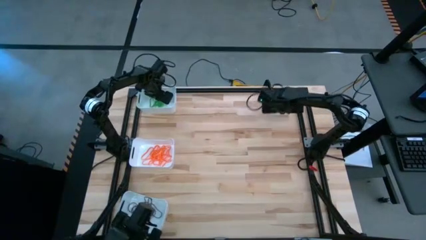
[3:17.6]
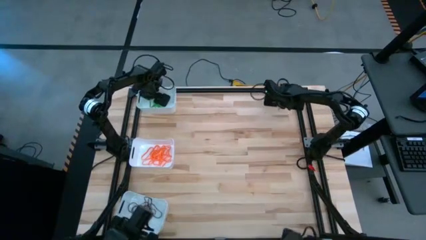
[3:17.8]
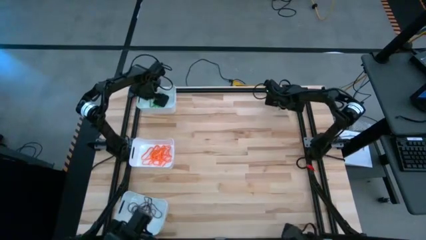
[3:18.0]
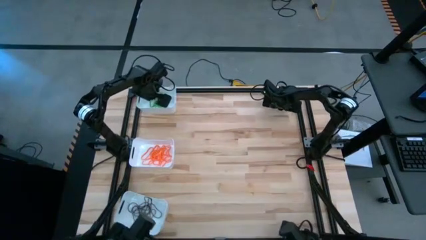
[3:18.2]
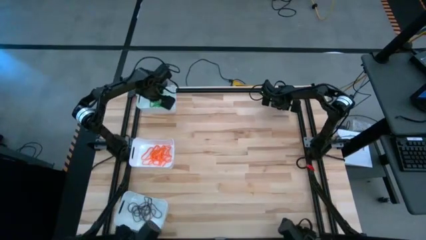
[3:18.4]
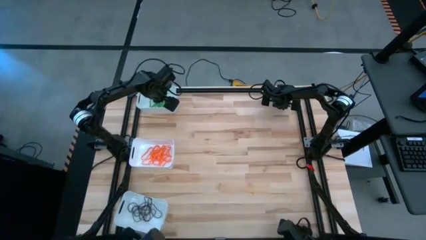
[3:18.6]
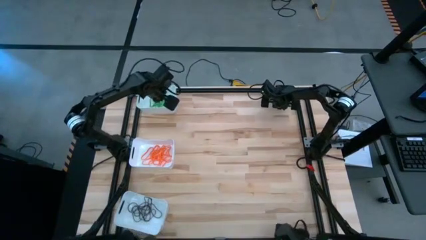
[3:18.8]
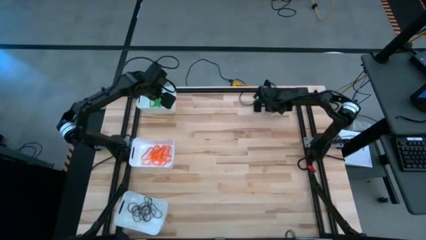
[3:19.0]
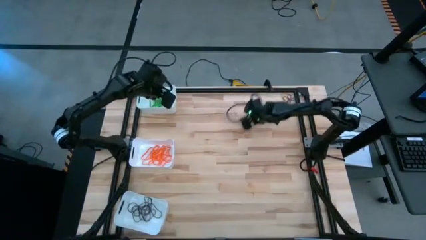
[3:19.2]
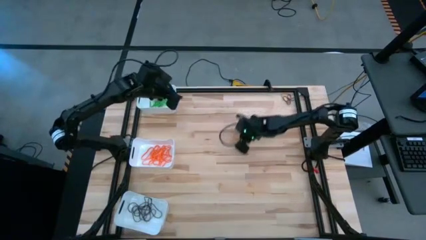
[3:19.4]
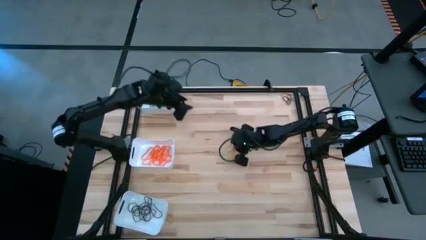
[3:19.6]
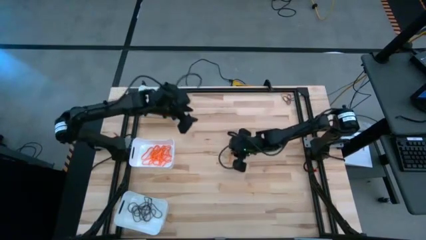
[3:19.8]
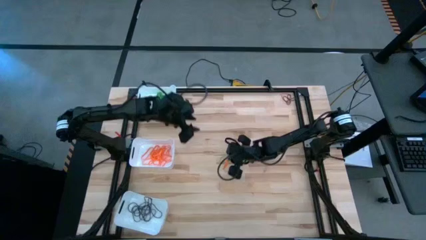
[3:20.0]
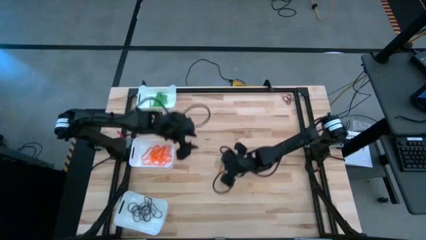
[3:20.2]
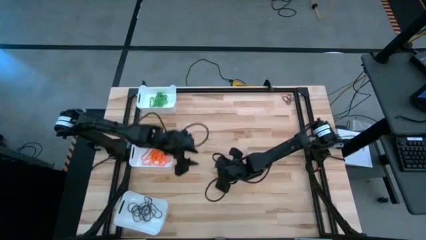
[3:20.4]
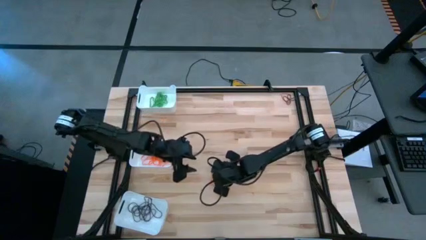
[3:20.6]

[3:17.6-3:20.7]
Task: Sort rubber bands into baskets
Put the green rubber band into the top white bin

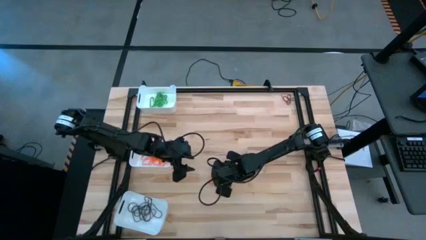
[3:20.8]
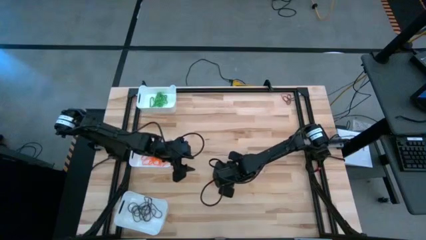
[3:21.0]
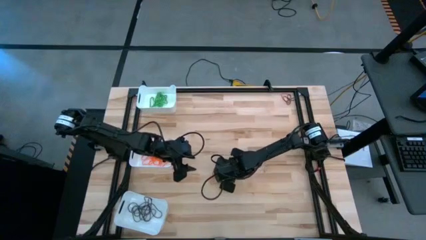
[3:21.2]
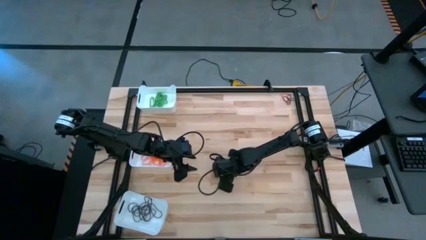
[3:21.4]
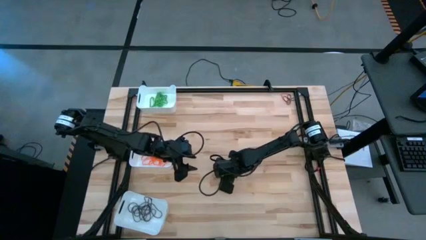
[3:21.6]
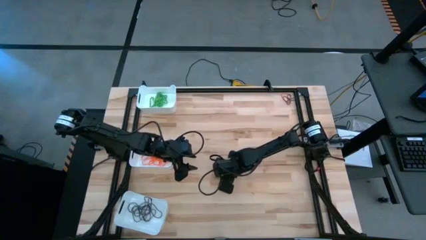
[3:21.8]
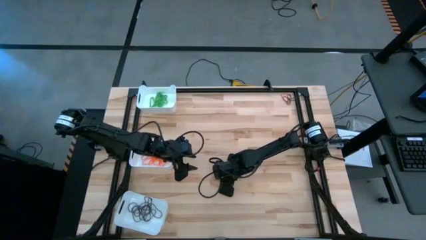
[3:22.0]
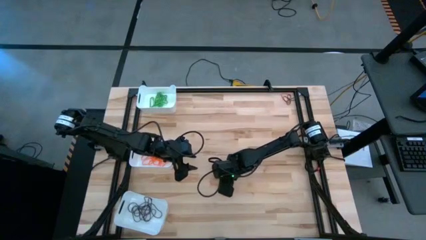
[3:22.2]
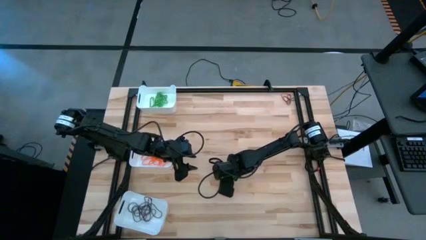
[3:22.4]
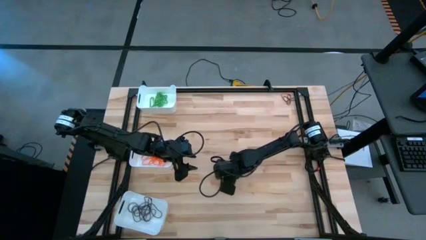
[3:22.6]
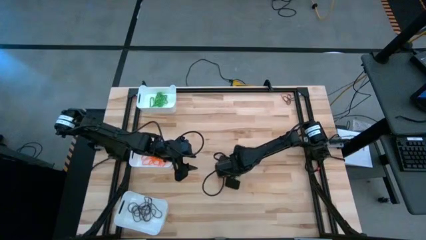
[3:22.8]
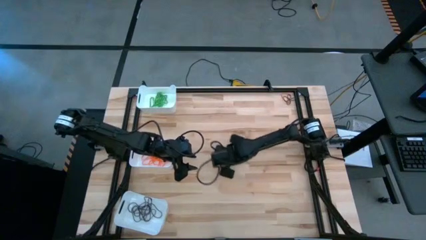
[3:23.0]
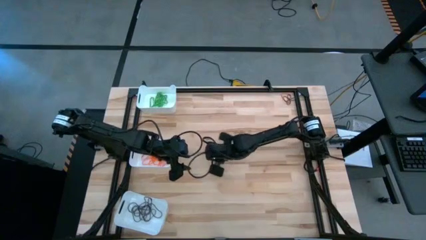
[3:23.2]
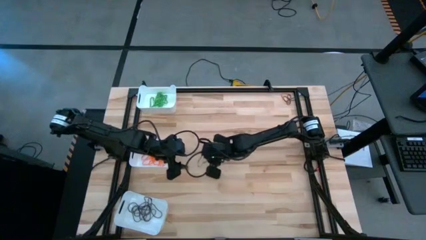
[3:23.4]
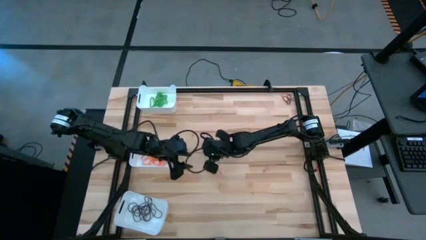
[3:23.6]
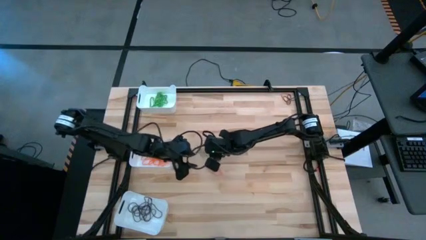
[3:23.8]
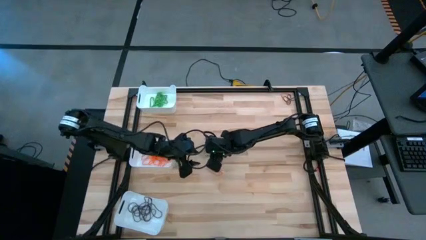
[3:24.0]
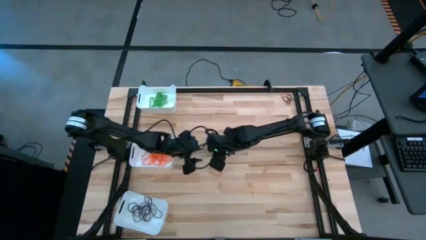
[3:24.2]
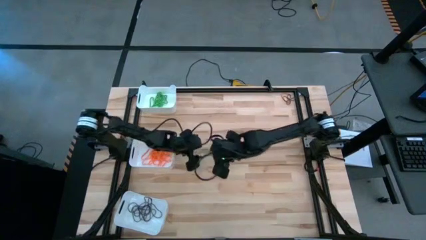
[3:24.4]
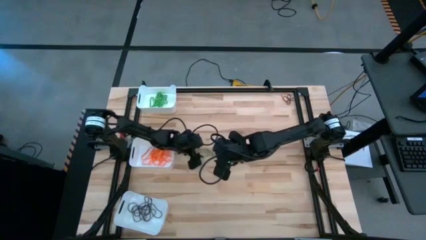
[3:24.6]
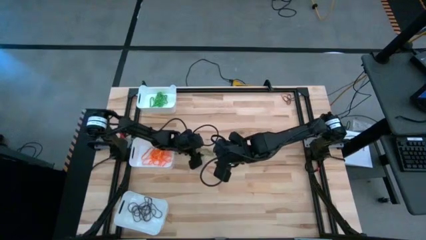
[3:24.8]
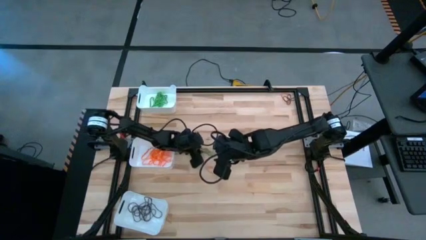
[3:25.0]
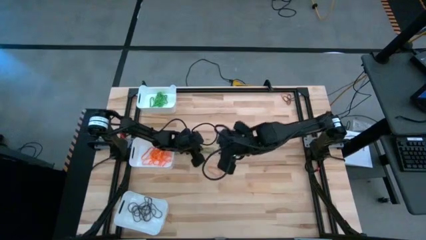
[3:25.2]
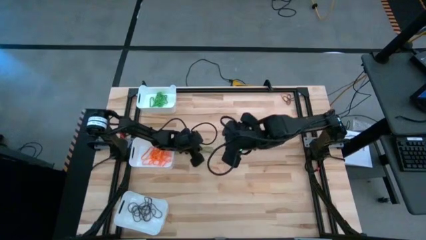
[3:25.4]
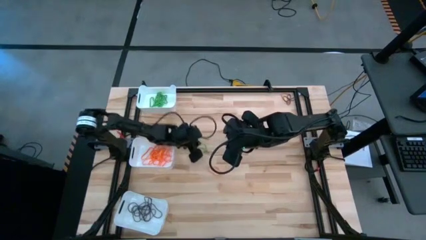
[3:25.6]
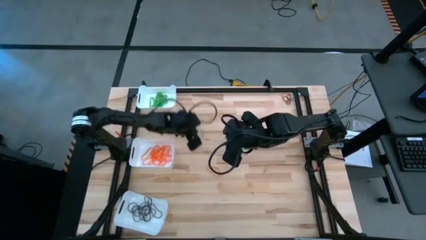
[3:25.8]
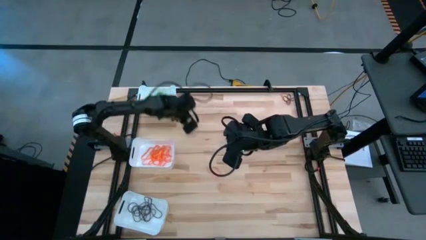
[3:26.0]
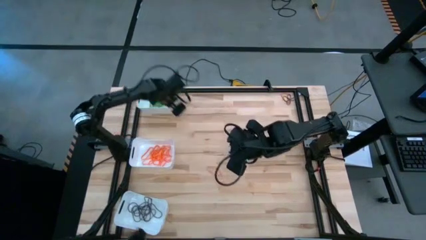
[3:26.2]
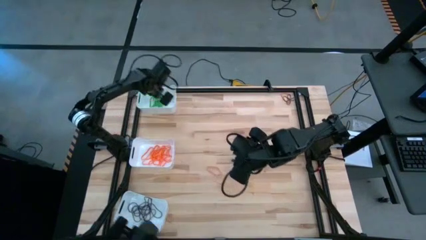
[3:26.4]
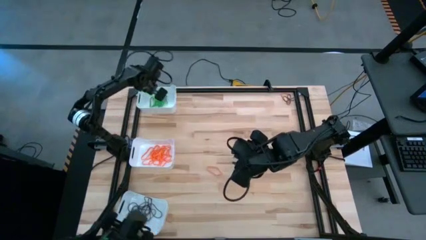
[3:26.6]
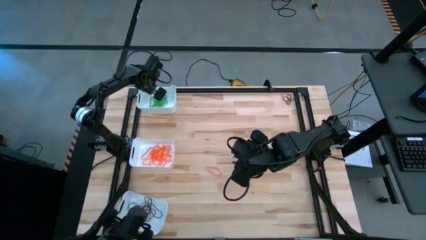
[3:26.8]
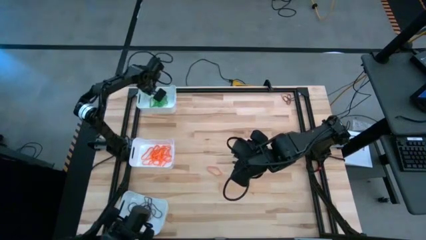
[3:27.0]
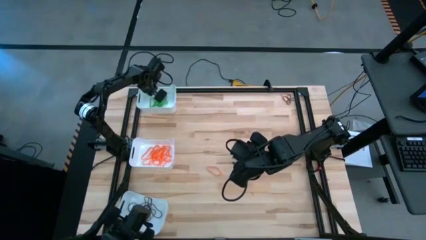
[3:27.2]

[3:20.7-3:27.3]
Put the green rubber band into the top white bin

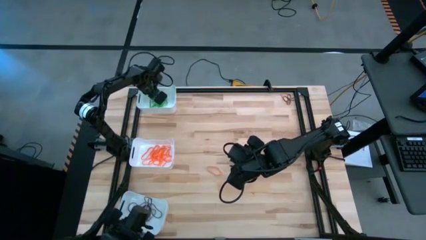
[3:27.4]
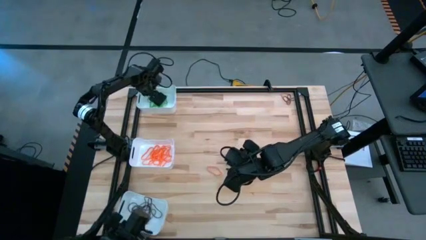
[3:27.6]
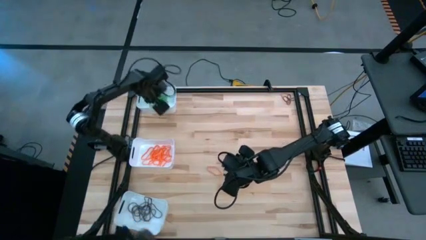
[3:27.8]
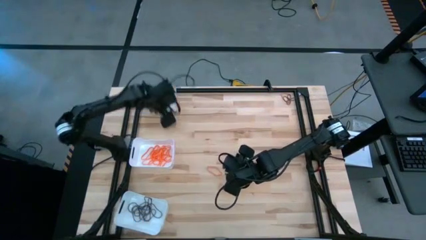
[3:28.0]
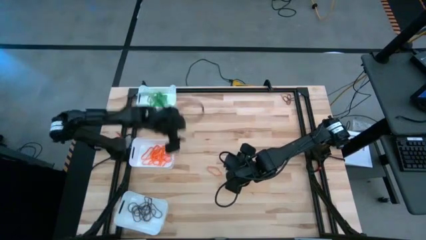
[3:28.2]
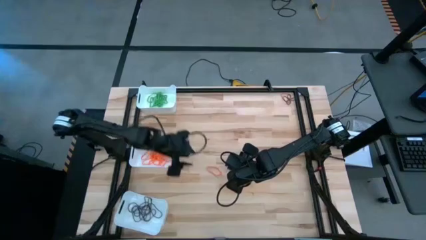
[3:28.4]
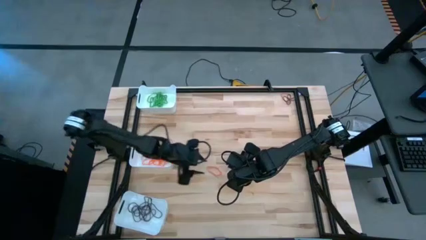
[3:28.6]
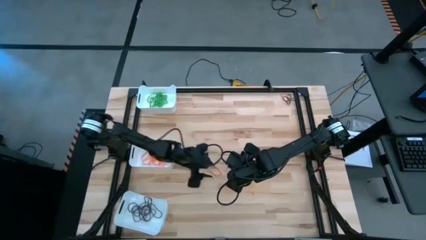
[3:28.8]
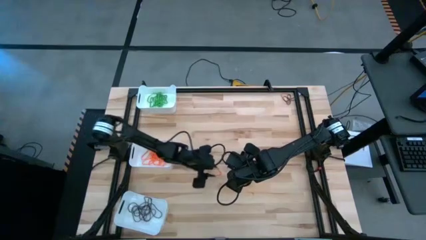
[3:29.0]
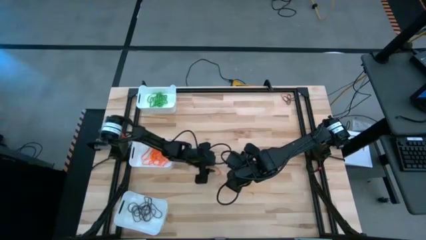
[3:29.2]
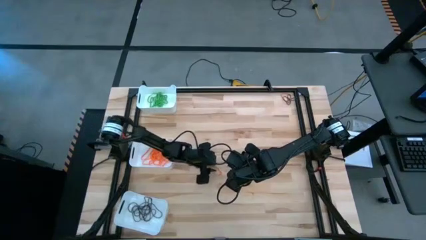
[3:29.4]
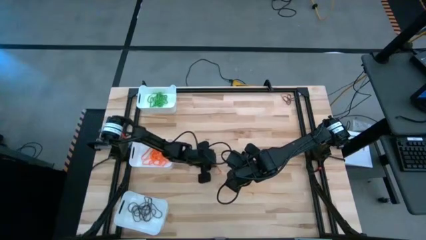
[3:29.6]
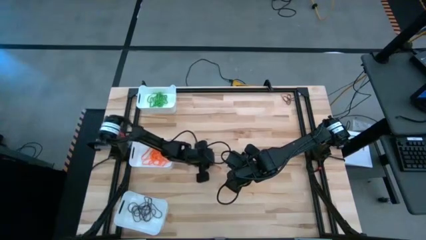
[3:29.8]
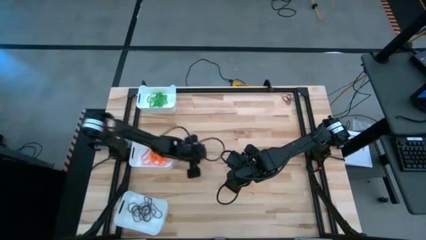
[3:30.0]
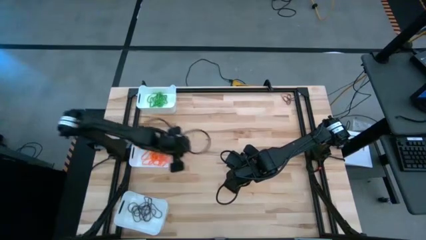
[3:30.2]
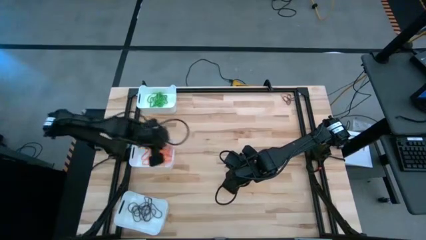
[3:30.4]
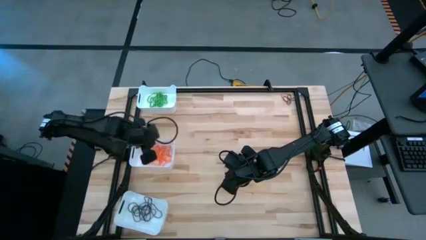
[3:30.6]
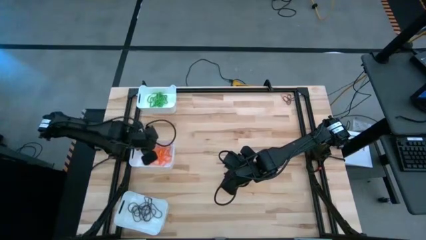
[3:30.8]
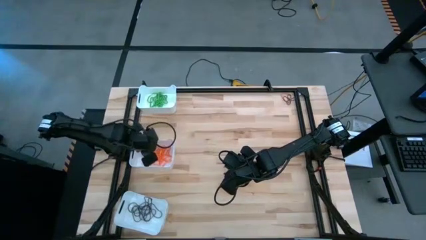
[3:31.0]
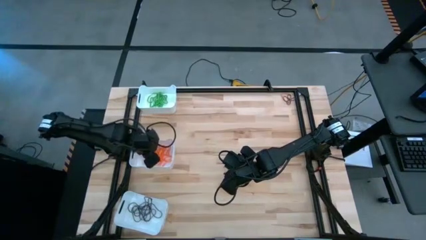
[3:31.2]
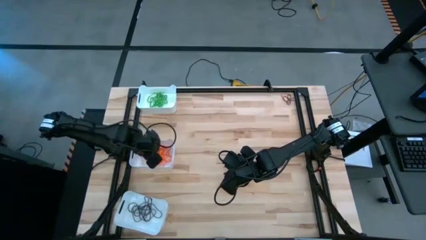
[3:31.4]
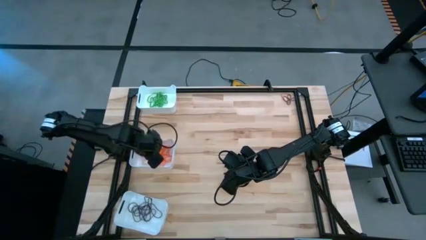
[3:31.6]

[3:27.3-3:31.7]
Put the orange rubber band into the middle white bin
